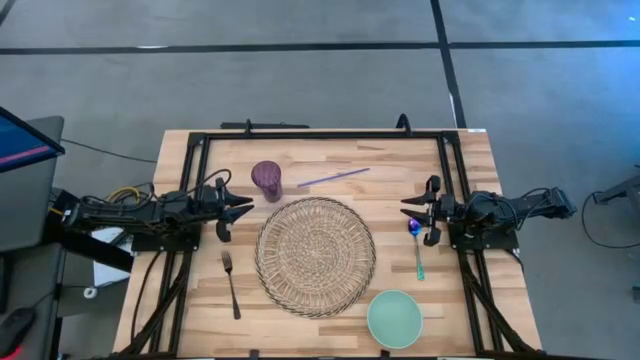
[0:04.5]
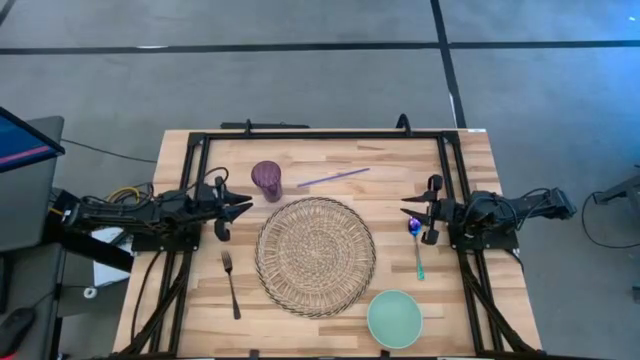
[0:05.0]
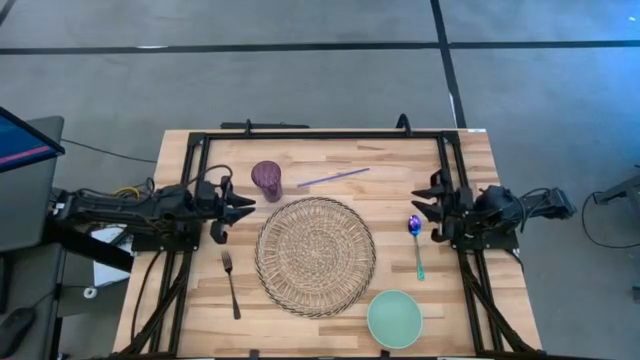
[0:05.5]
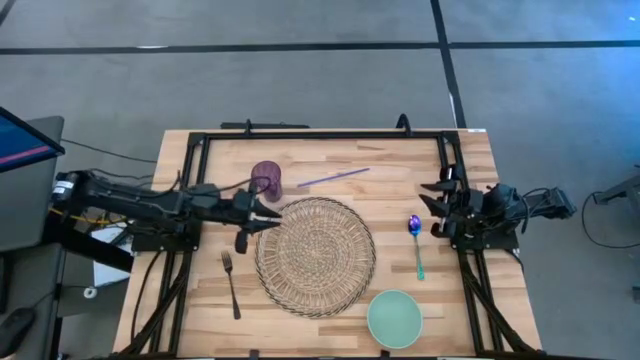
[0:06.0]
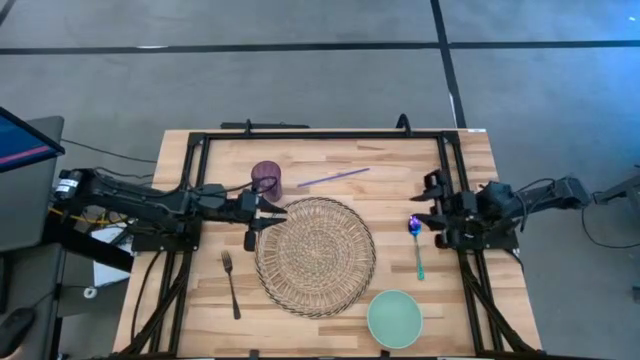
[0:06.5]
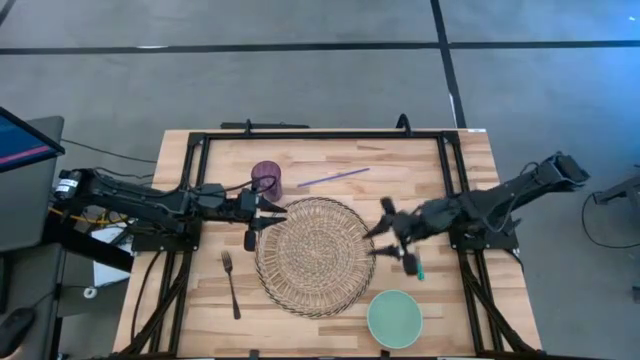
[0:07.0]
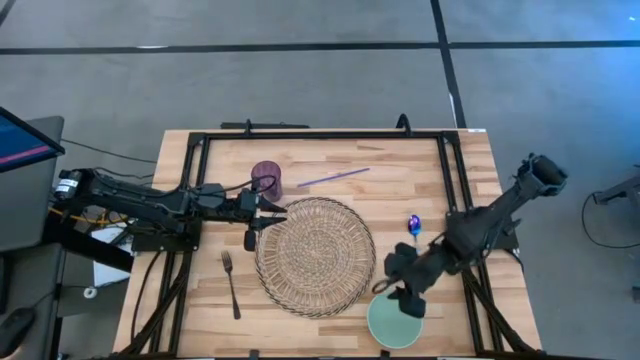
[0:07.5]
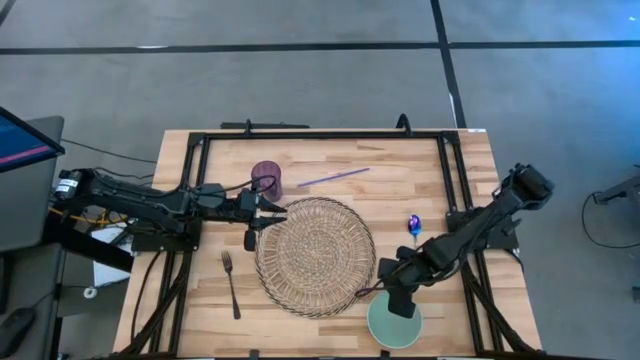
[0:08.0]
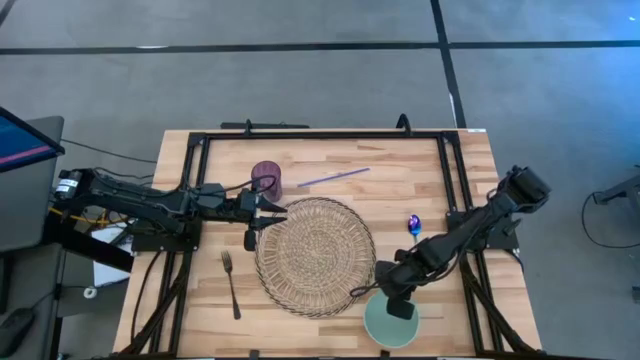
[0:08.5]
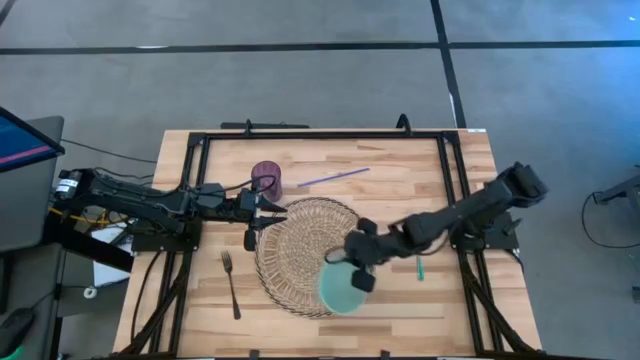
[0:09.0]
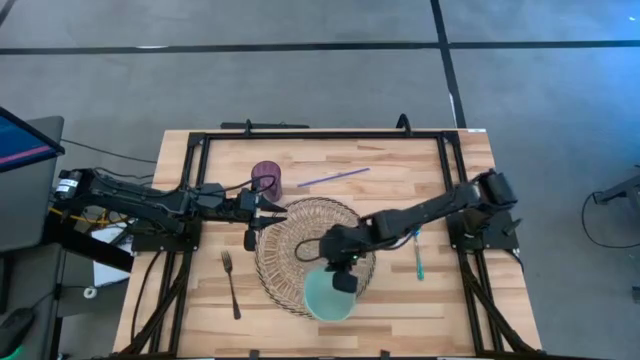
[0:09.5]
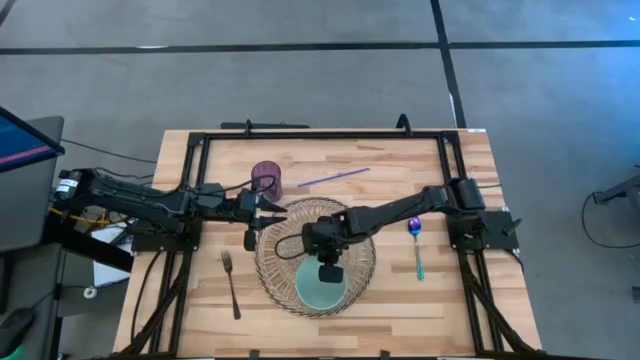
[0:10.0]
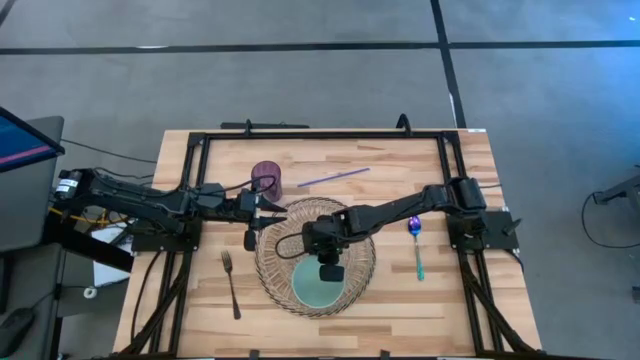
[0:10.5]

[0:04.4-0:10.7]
Task: Pick & Place Utensil
Put the green bowl on the table mat

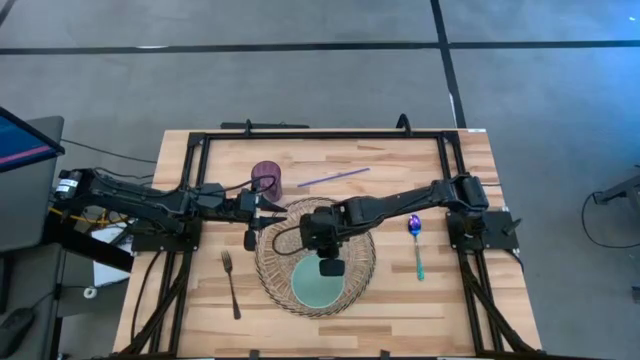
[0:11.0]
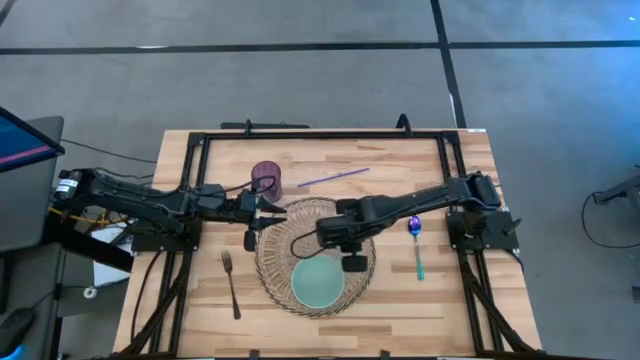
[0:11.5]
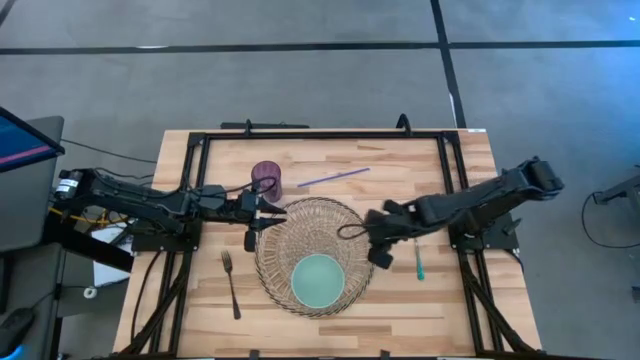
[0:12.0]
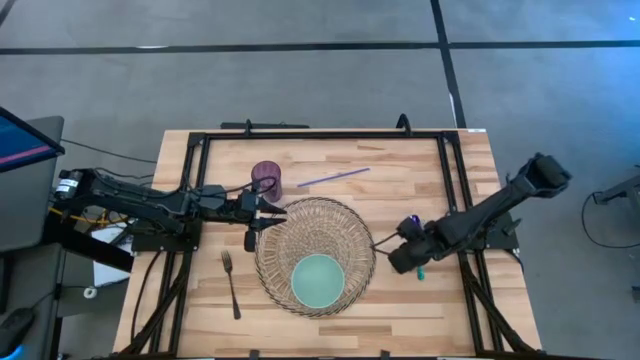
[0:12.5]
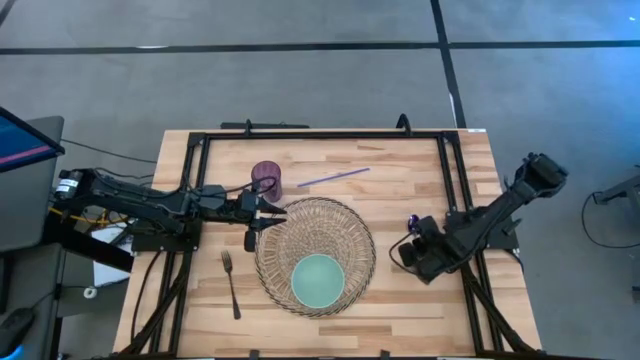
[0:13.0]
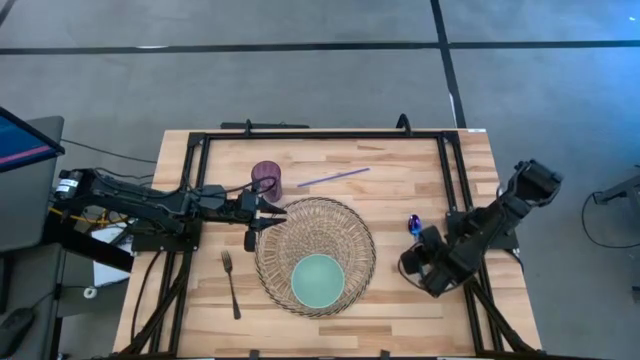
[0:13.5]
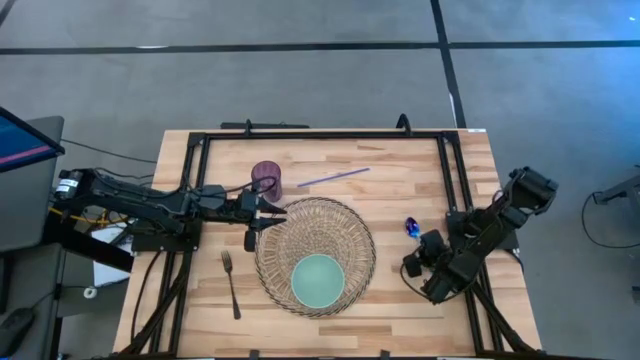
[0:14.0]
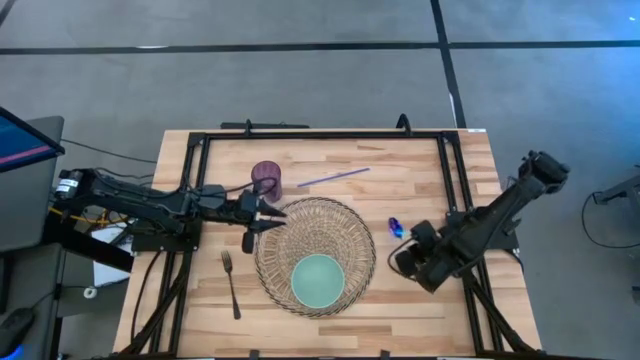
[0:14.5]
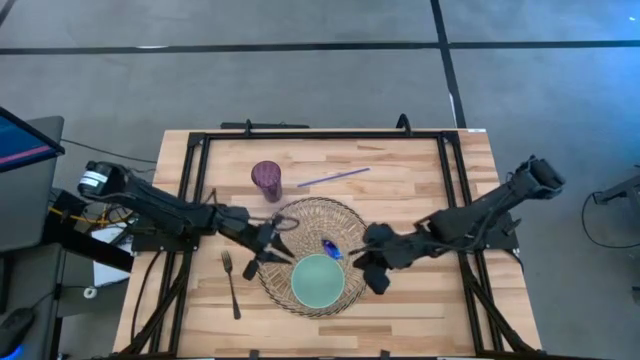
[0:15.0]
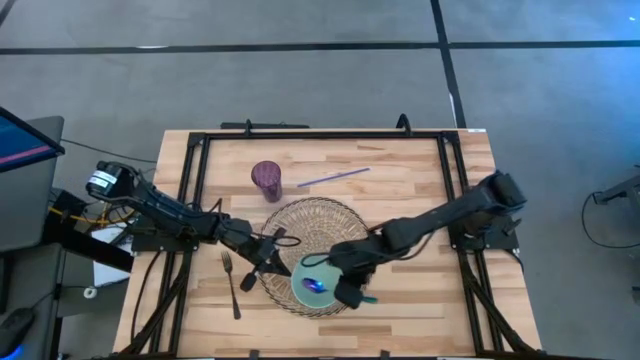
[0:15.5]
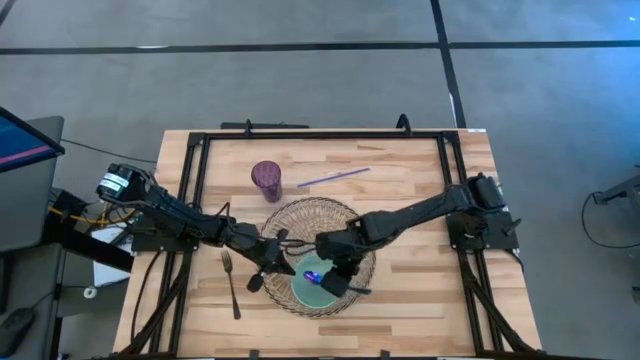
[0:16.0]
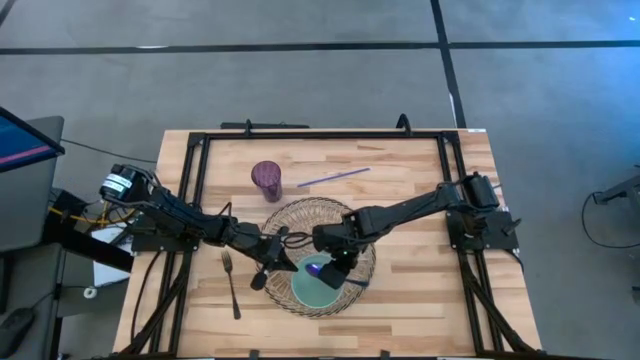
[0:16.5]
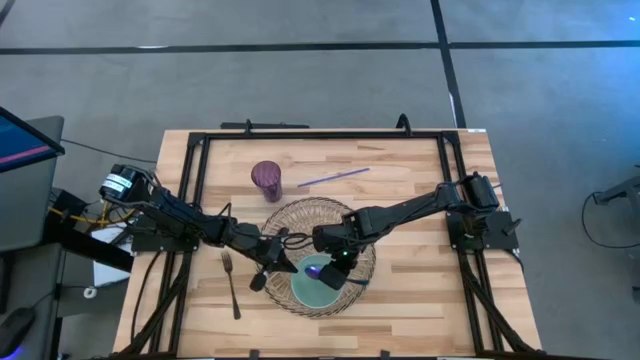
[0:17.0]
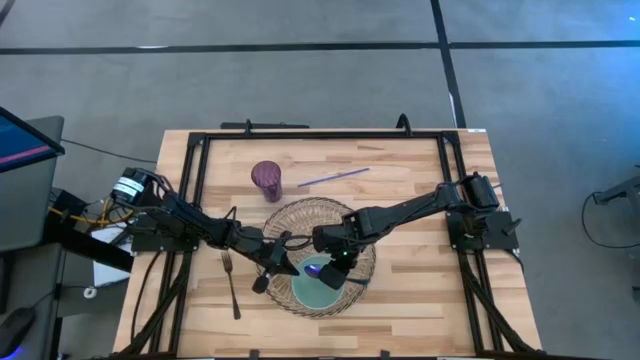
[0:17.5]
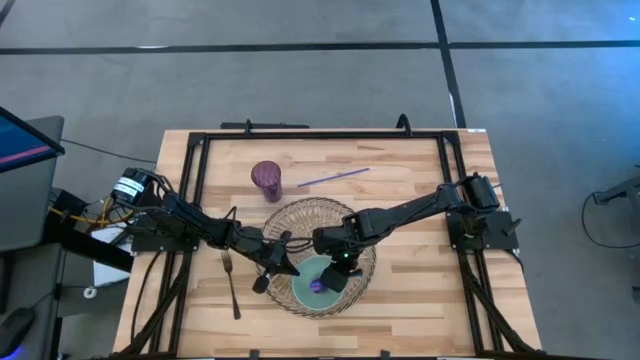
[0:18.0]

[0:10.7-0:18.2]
Put the blue spoon into the green bowl

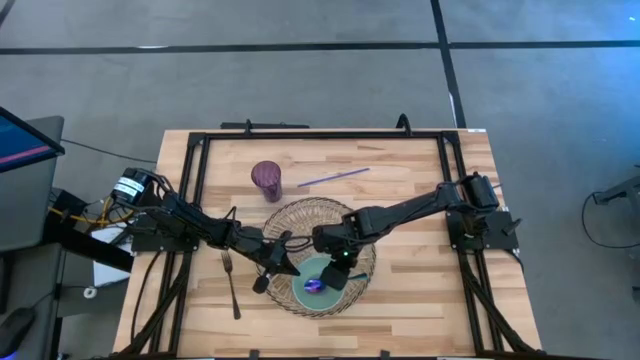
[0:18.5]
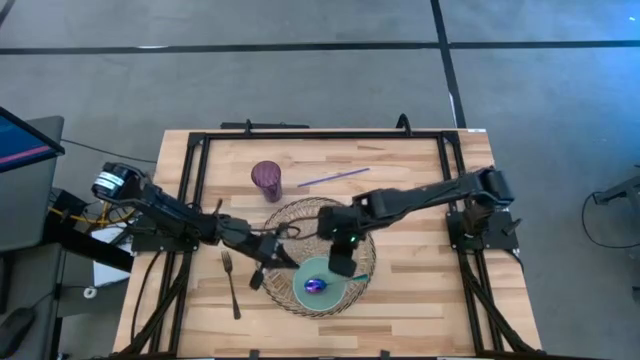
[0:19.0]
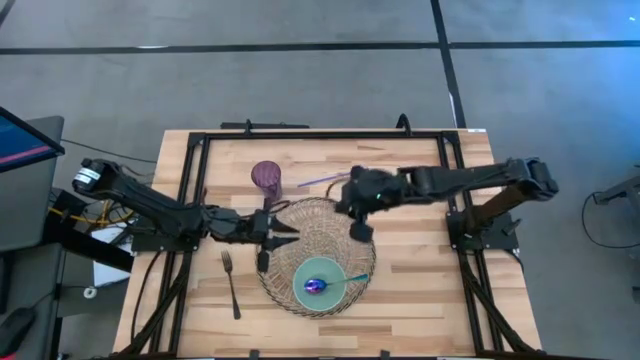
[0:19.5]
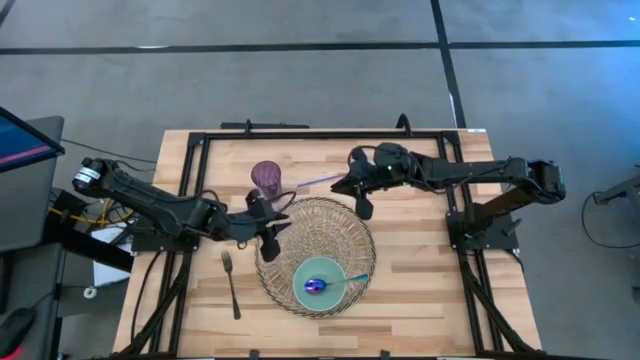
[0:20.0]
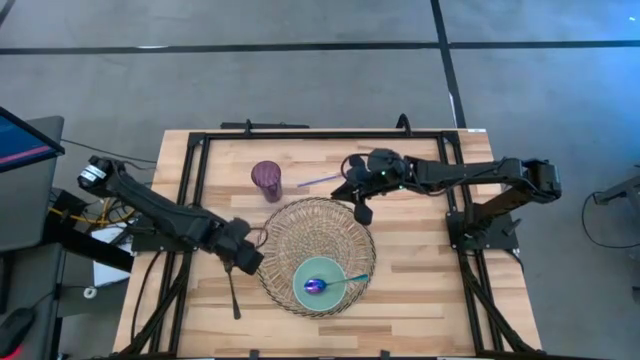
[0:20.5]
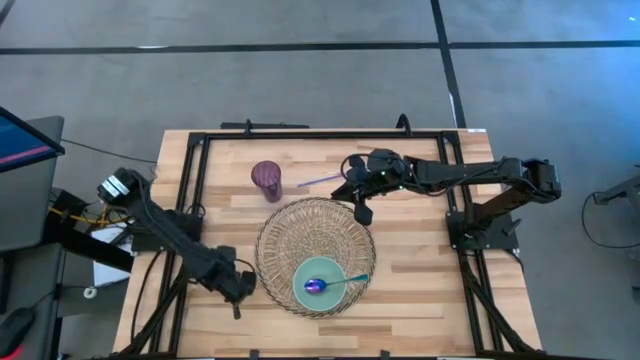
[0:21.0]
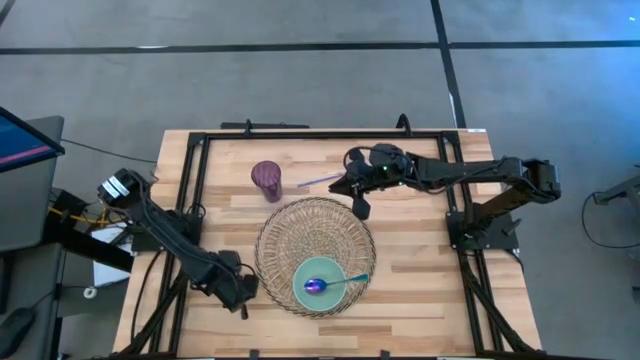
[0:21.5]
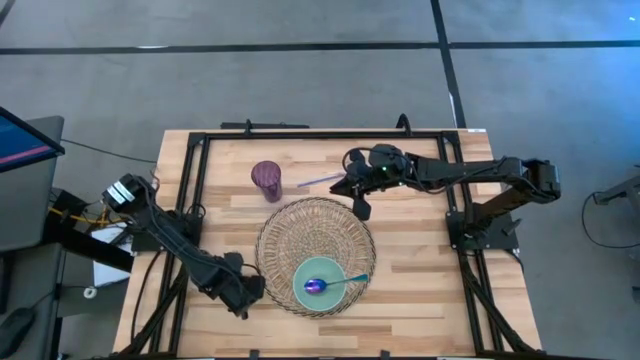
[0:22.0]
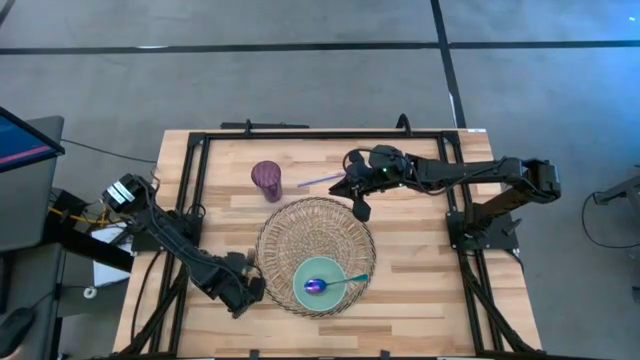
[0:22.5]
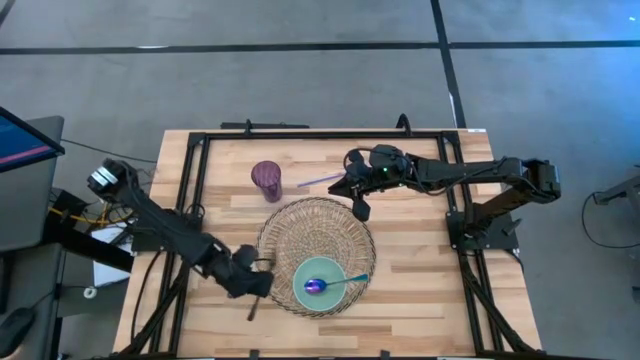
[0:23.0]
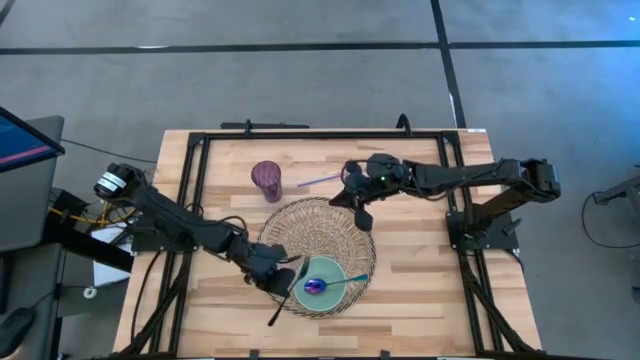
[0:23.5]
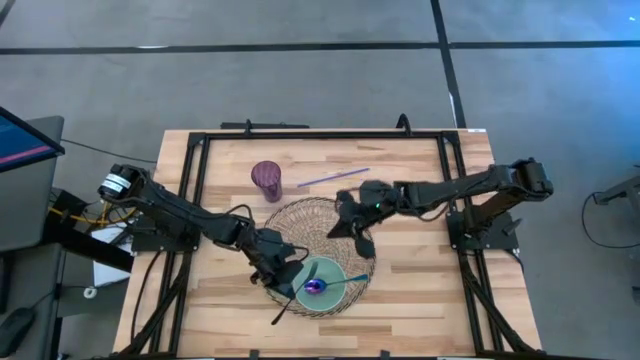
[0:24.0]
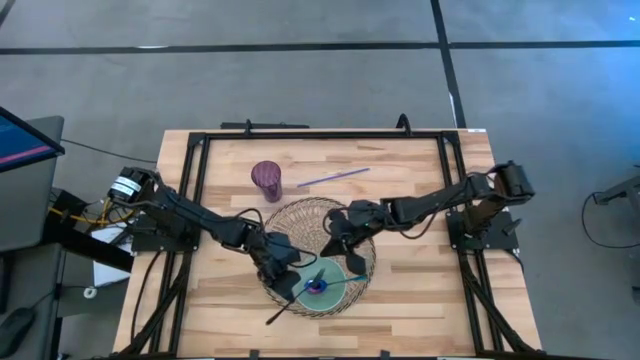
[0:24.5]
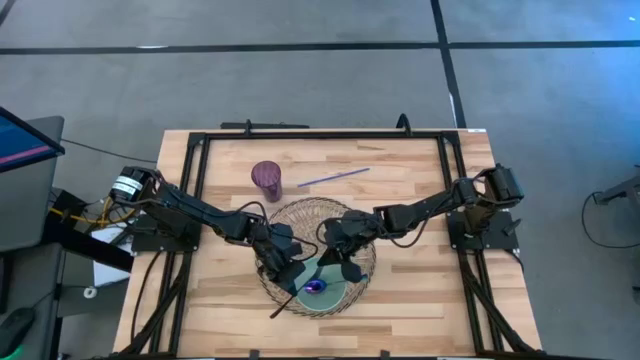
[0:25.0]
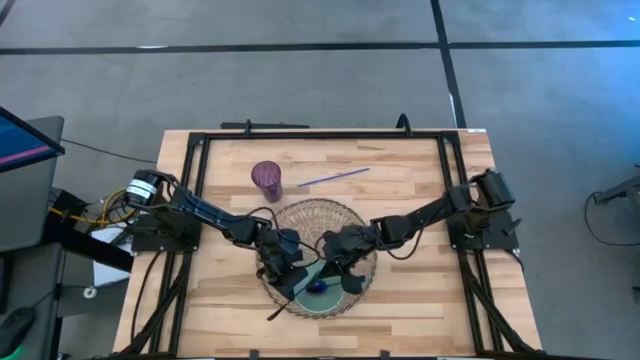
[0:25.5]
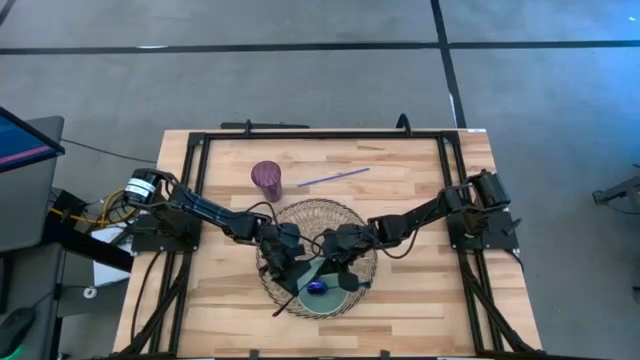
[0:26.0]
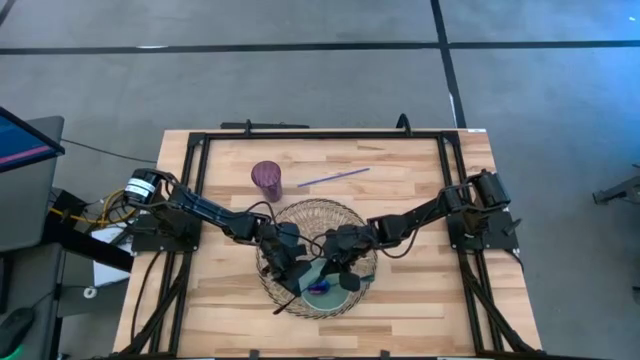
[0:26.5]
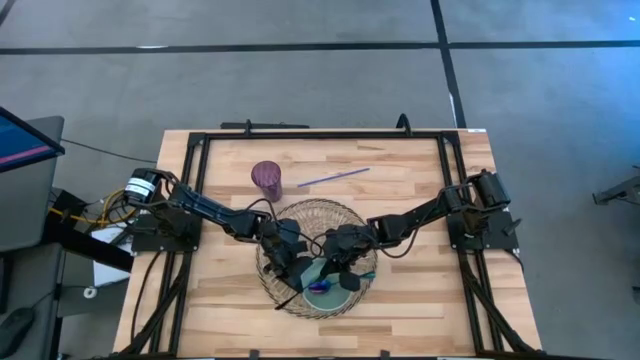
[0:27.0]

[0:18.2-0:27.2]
Put the black fork into the green bowl
